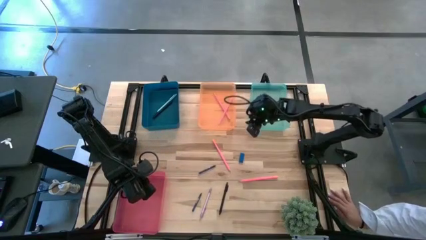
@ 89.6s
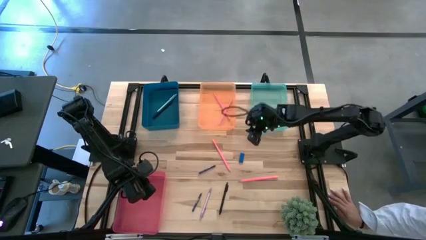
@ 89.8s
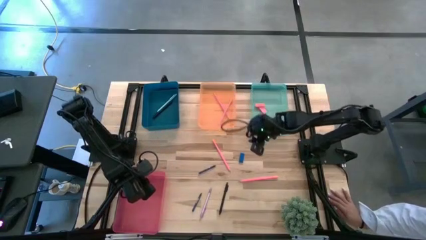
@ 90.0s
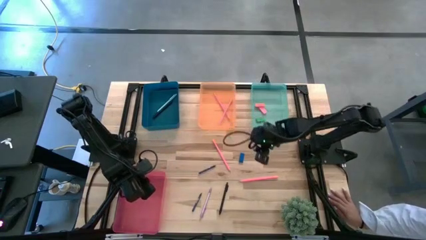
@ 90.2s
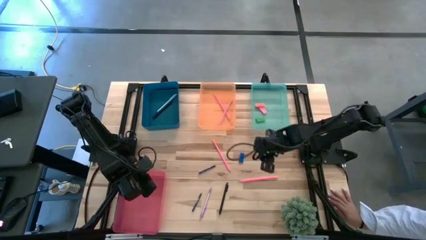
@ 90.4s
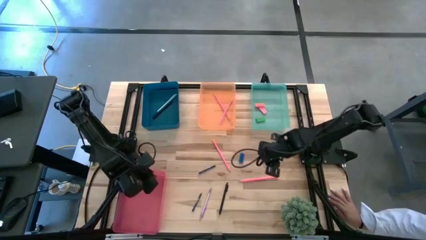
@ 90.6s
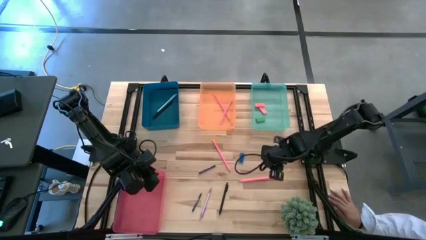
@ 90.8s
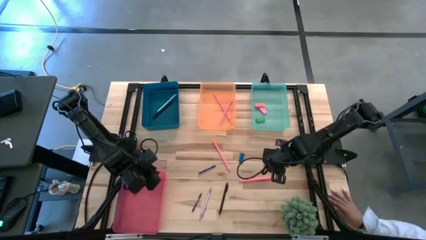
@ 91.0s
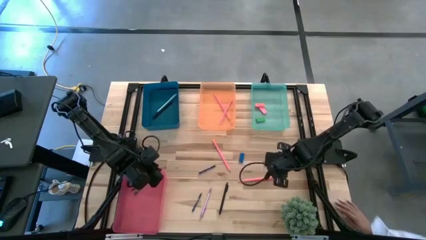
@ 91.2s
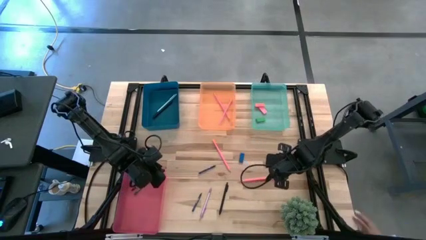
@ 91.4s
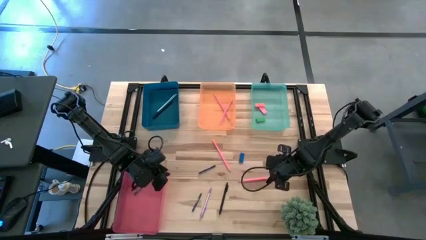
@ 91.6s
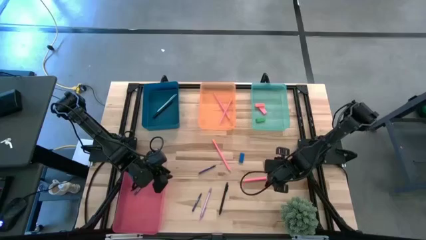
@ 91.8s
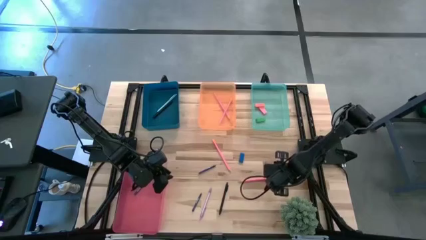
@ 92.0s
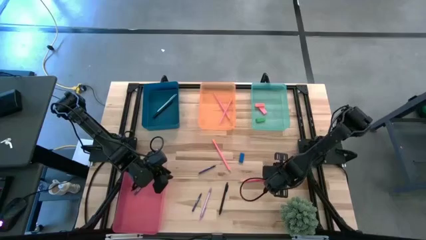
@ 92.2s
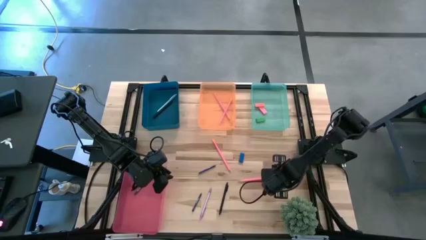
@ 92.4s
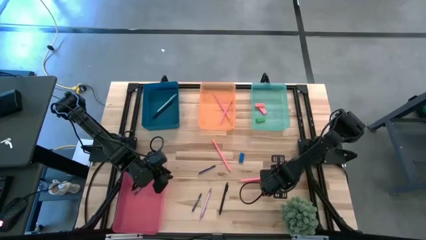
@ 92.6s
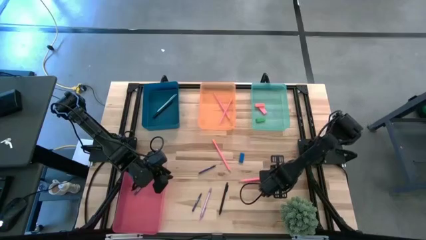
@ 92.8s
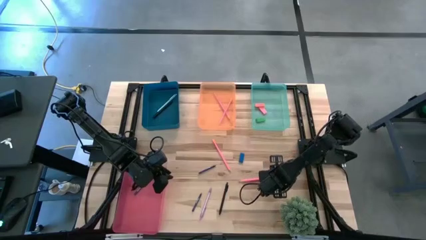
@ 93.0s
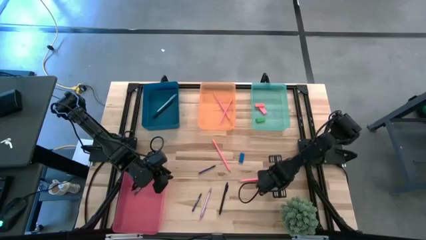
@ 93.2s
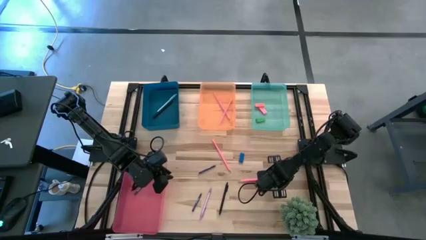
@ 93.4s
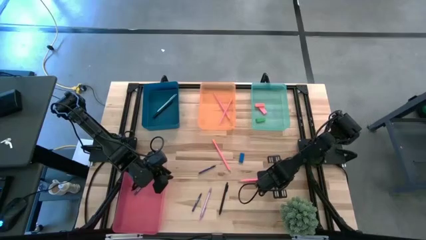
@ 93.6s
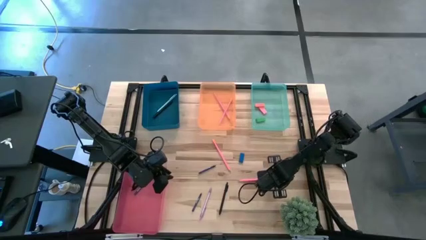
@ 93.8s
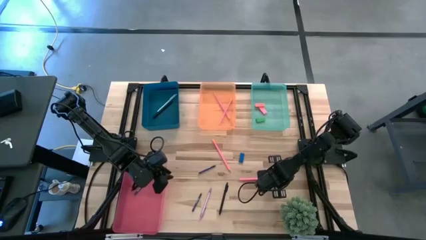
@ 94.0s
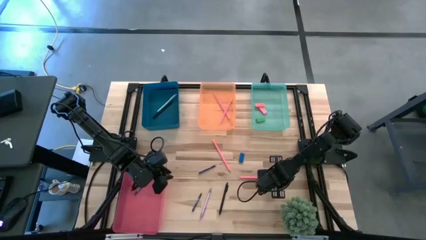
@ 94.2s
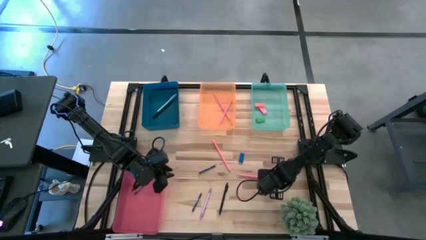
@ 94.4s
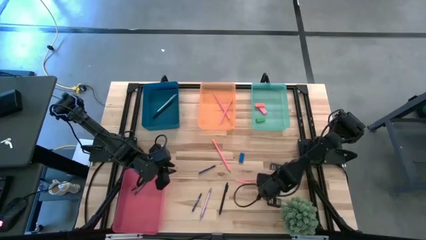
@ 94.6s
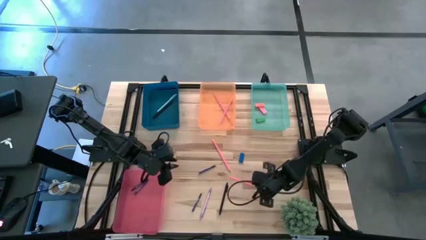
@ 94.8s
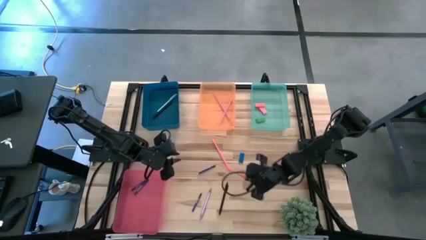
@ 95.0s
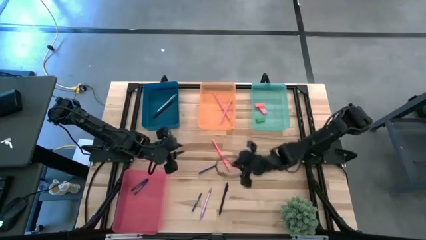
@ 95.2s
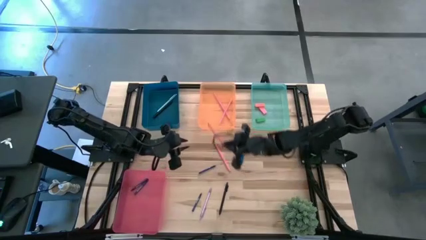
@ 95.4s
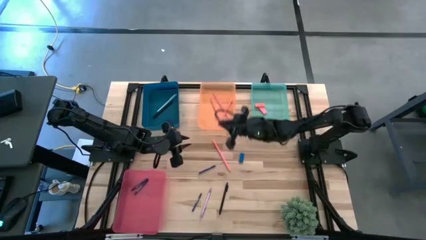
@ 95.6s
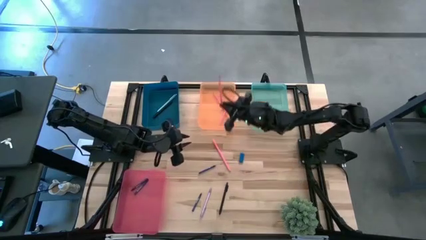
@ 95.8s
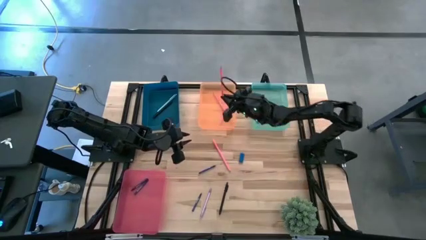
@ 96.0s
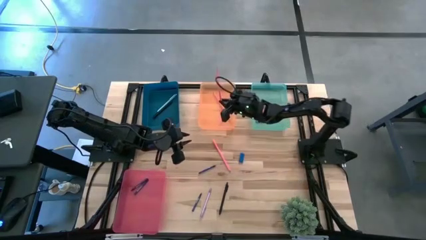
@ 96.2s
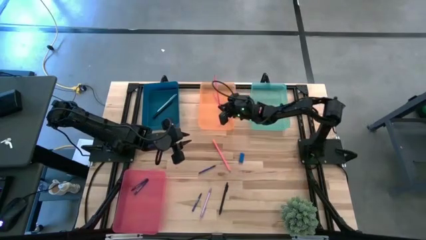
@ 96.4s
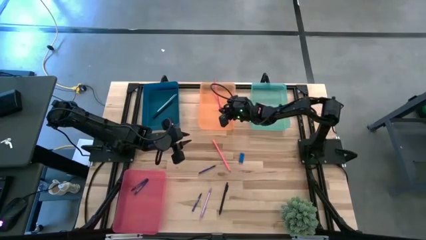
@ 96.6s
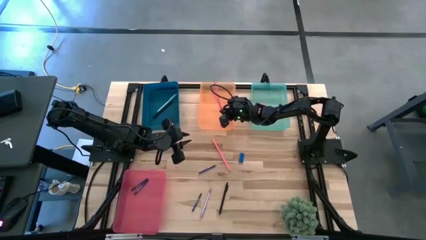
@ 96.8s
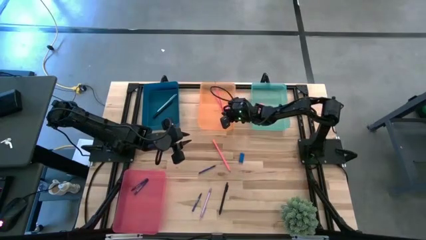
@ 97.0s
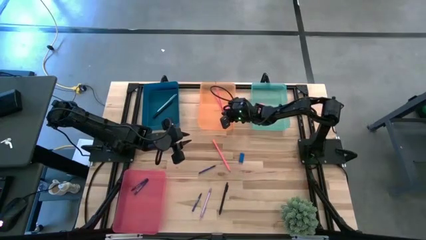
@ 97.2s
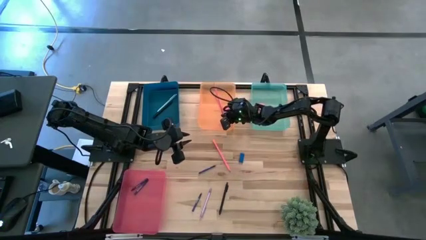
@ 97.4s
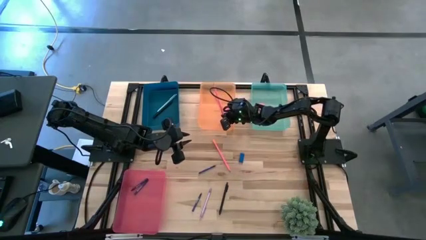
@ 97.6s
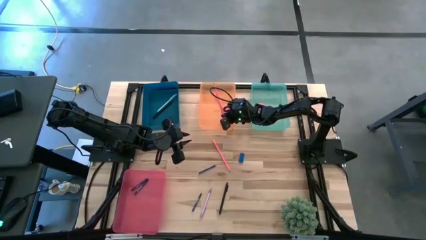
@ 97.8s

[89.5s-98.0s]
Task: Sort crayons/erasers/pens/pencils in bins
Put the bottom pencil into the orange bin

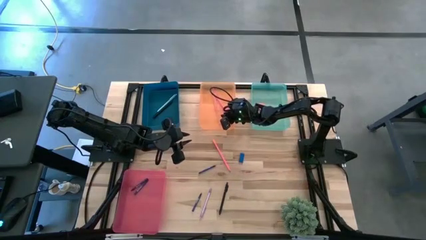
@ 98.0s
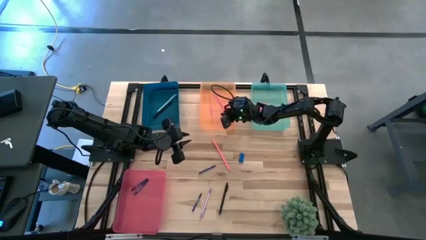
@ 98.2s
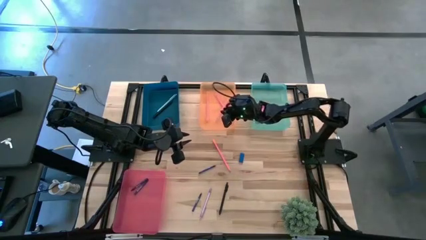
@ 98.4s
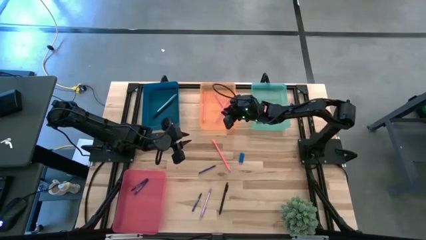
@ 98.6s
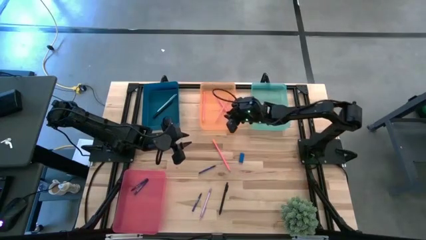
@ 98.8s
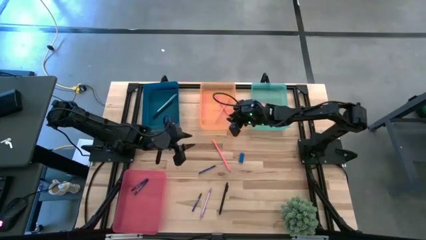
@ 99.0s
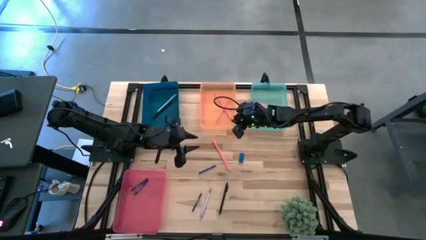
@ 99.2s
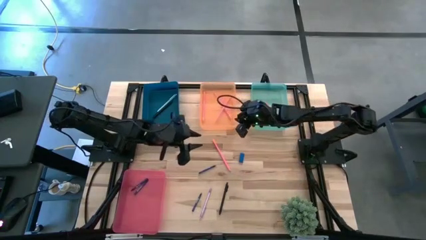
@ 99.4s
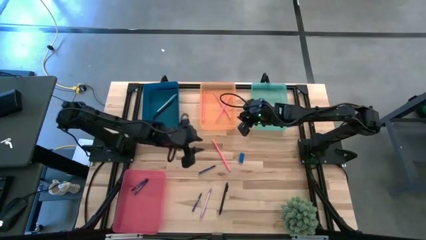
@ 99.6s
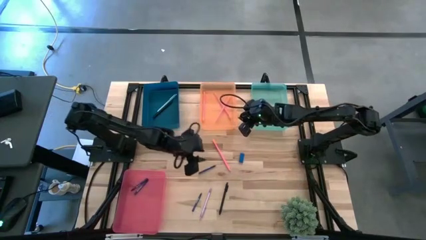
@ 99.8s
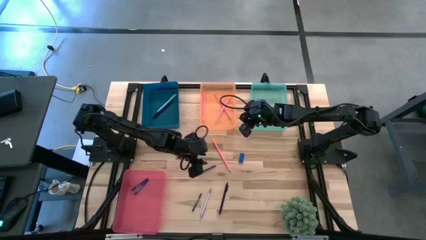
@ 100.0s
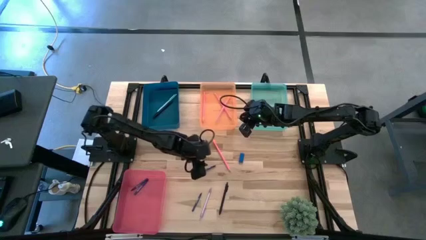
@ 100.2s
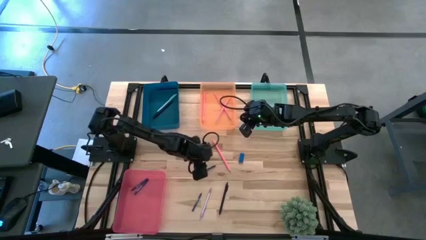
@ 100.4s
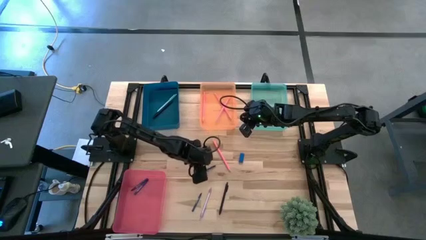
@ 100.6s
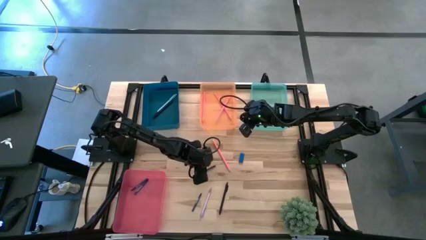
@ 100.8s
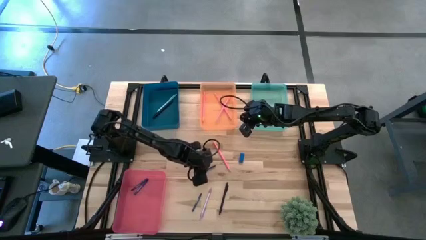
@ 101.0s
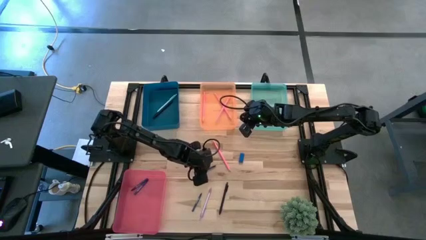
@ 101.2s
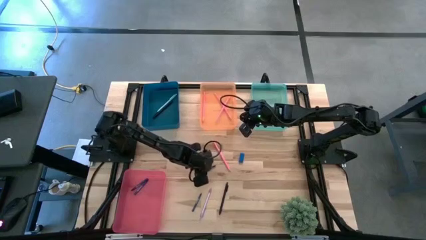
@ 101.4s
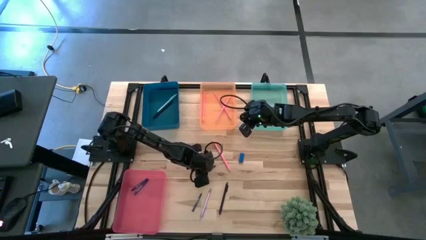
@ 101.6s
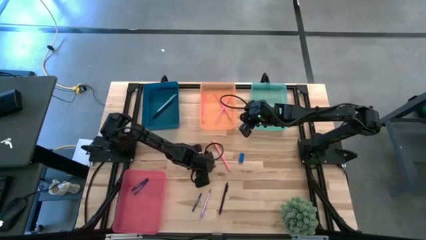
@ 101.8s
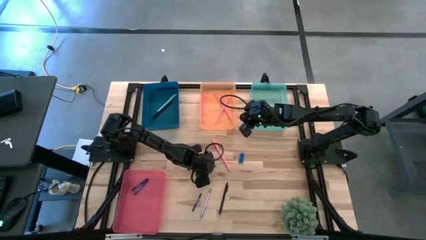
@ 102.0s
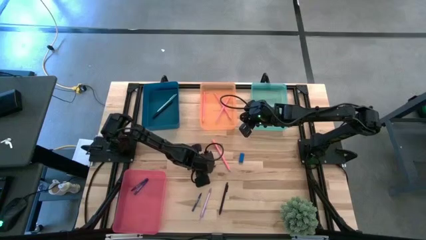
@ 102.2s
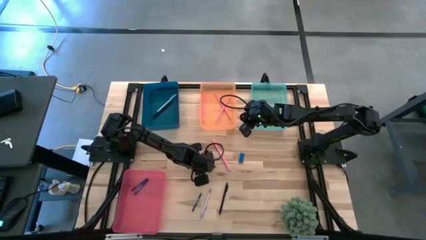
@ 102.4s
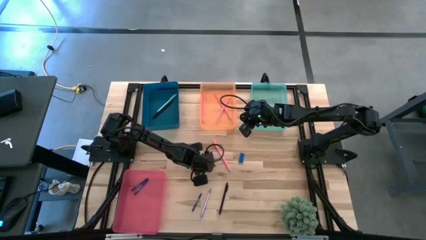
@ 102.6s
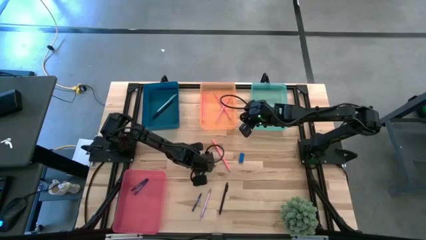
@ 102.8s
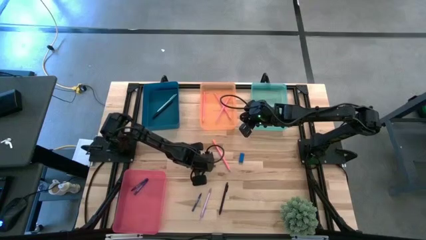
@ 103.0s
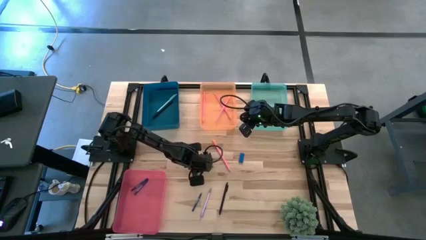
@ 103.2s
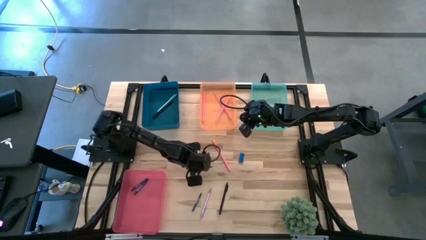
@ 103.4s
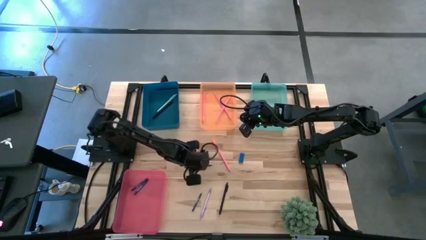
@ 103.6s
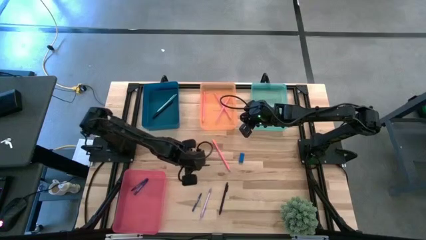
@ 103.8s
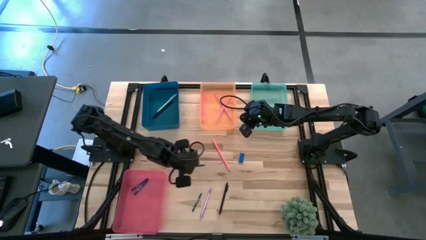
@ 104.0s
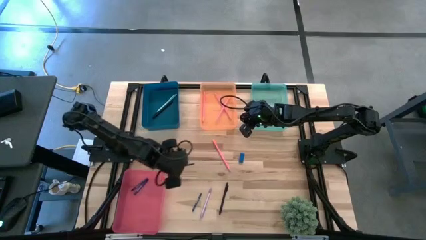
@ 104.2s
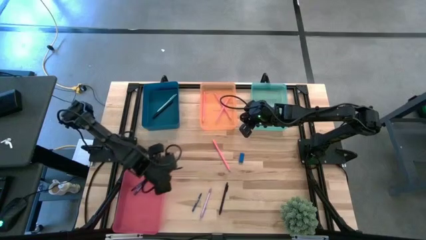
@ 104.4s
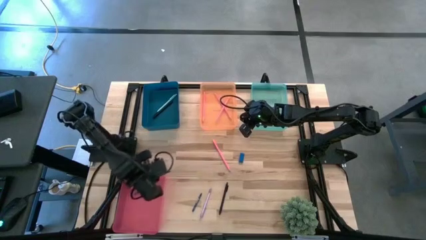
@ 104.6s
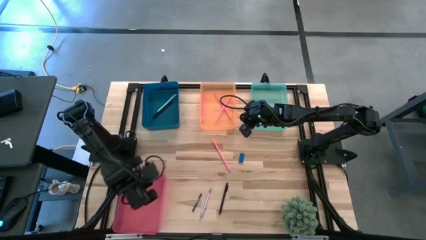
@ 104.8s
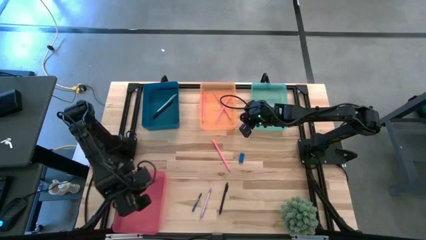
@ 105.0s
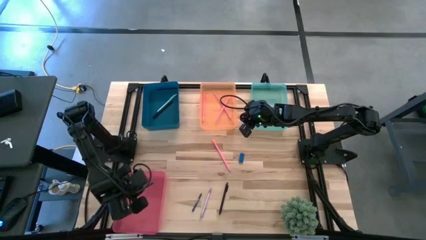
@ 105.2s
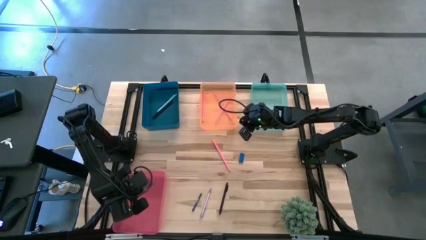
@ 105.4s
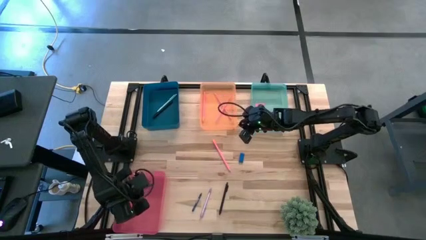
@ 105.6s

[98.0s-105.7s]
Put the top crayon into the pink bin

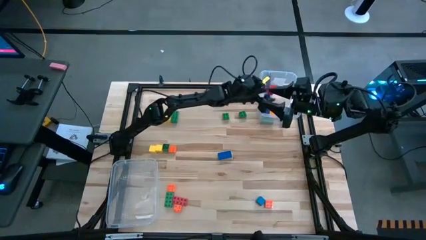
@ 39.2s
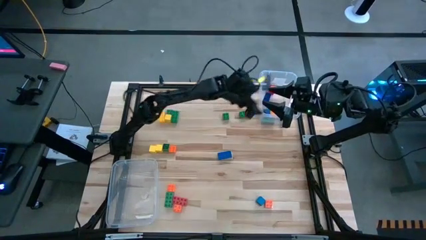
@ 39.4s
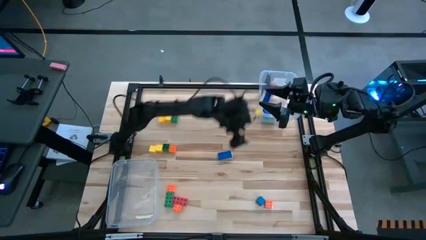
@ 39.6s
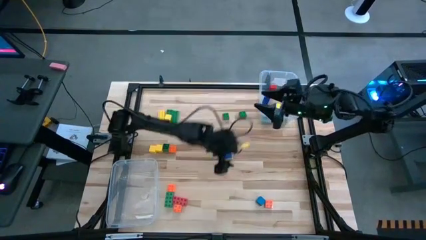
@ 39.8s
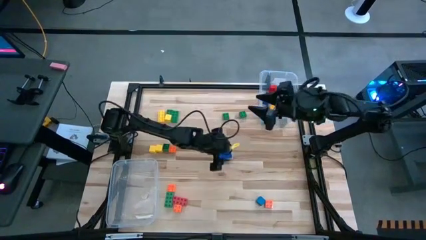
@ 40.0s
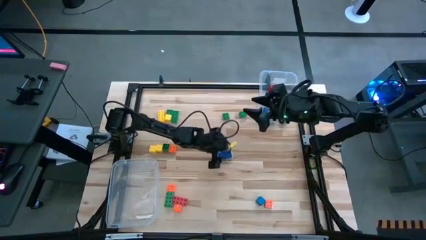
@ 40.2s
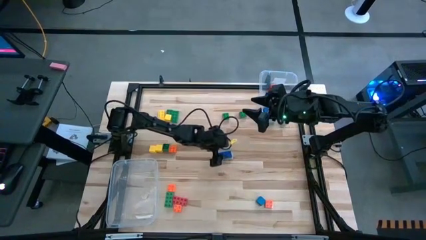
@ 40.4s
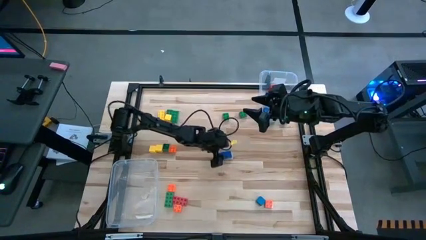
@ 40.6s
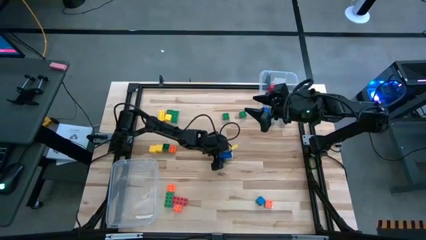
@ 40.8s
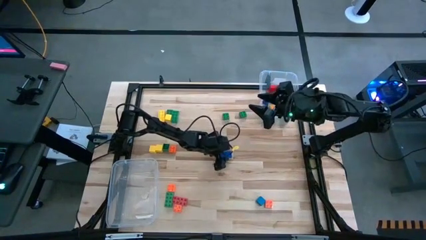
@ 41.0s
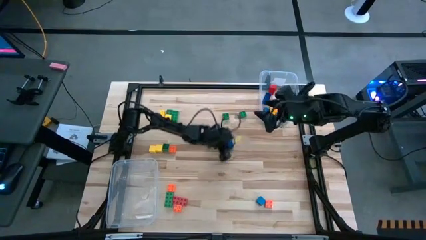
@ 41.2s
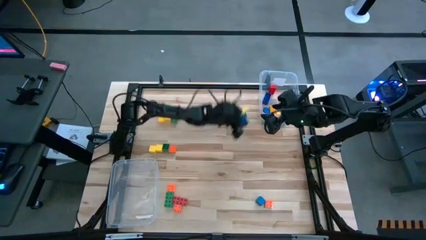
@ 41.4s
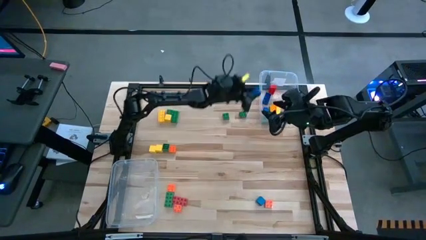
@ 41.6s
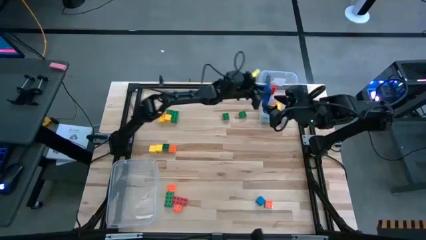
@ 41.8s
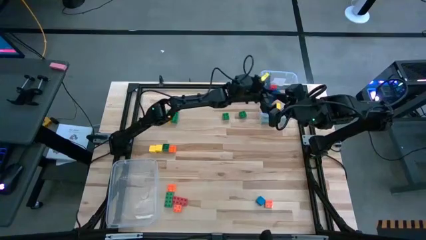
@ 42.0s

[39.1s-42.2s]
Task: Sort blocks by size
Put the large blue game piece into the right transparent bin
